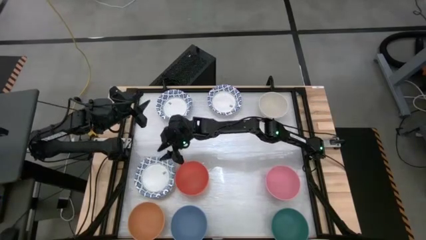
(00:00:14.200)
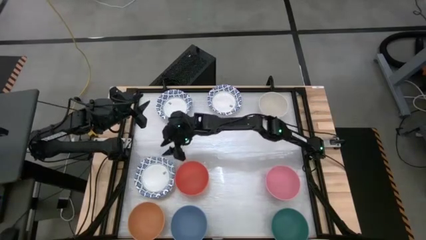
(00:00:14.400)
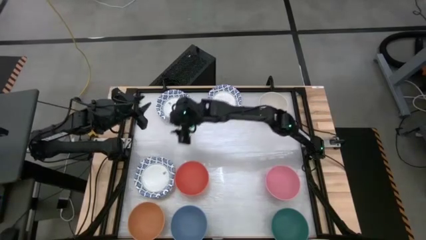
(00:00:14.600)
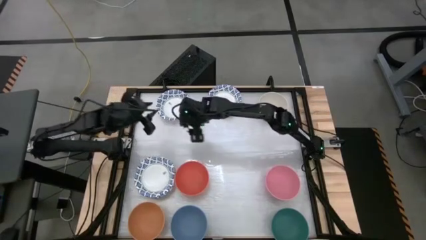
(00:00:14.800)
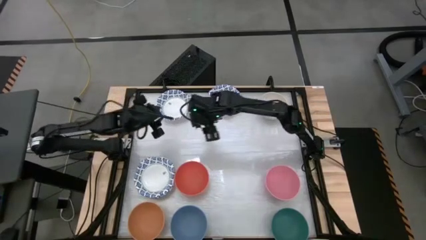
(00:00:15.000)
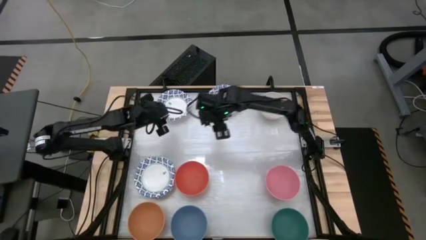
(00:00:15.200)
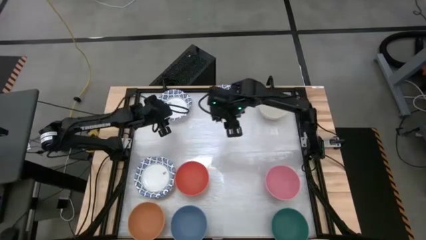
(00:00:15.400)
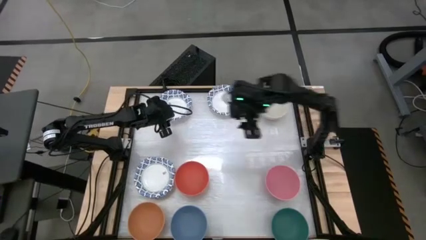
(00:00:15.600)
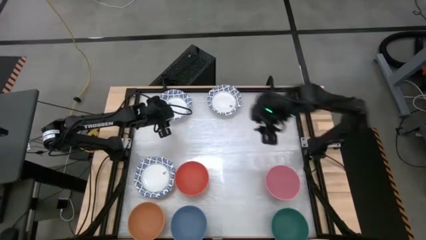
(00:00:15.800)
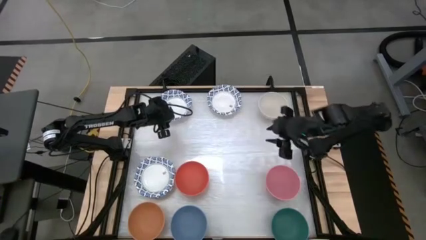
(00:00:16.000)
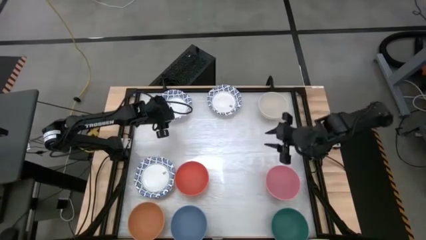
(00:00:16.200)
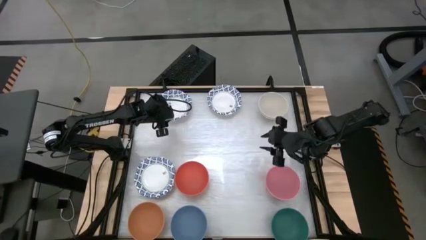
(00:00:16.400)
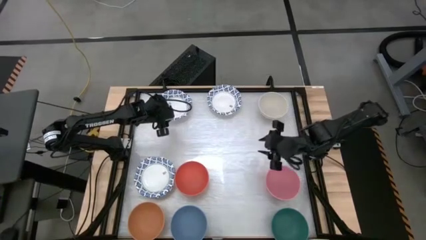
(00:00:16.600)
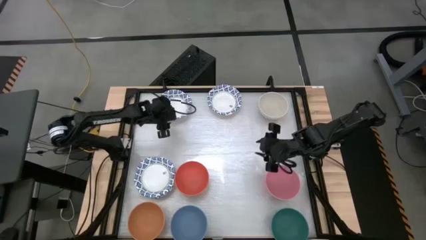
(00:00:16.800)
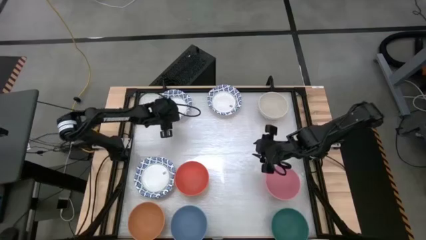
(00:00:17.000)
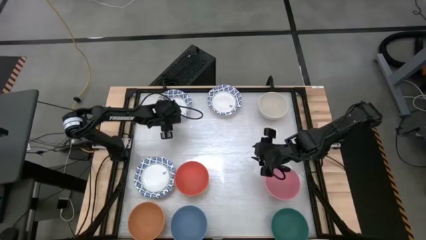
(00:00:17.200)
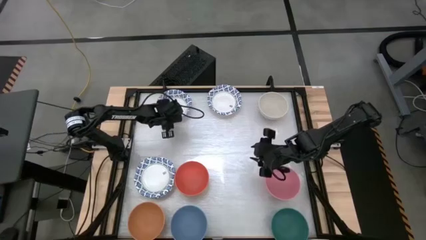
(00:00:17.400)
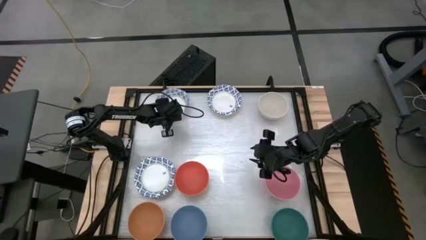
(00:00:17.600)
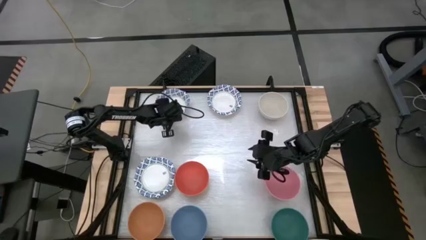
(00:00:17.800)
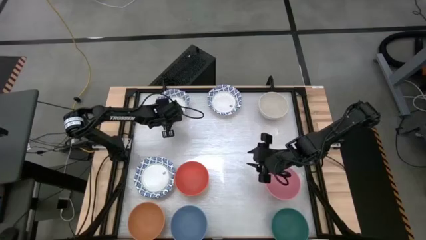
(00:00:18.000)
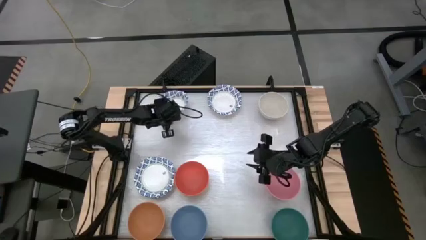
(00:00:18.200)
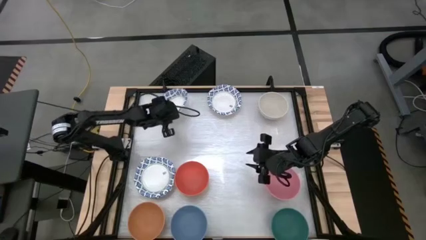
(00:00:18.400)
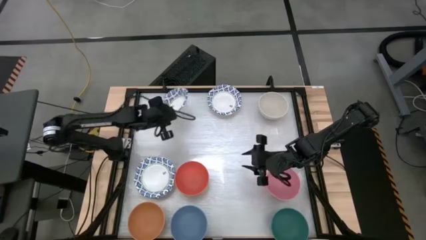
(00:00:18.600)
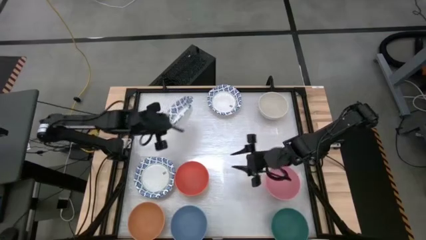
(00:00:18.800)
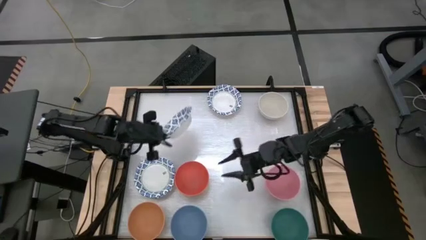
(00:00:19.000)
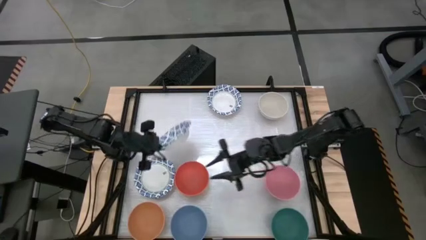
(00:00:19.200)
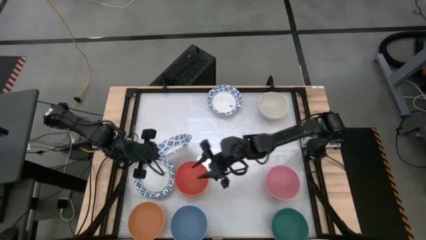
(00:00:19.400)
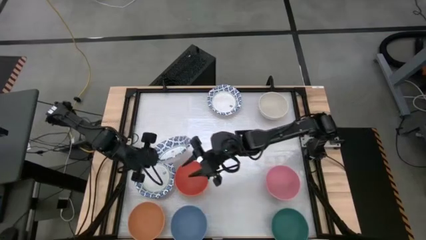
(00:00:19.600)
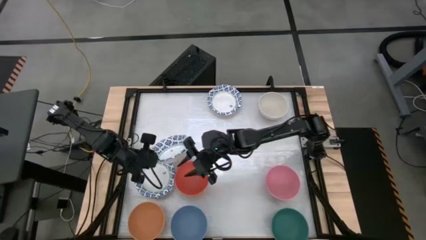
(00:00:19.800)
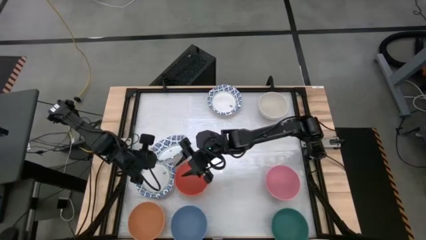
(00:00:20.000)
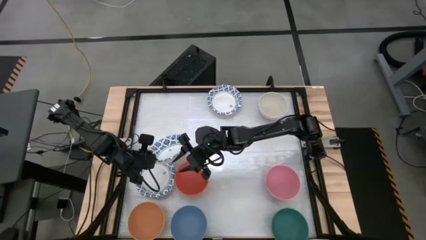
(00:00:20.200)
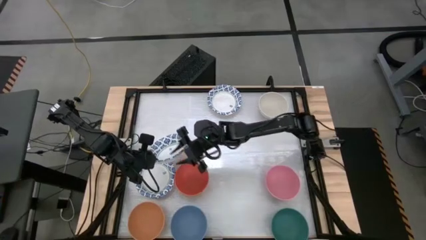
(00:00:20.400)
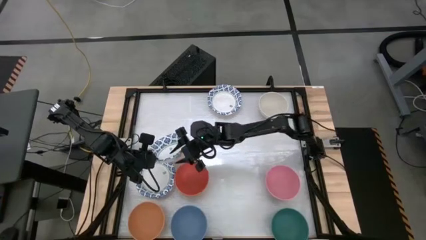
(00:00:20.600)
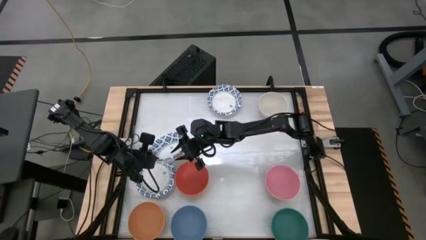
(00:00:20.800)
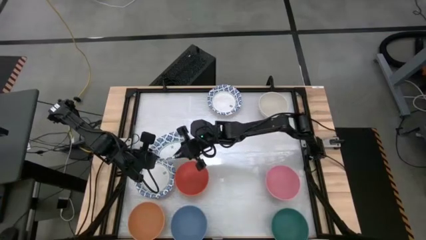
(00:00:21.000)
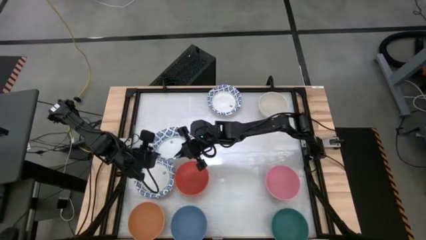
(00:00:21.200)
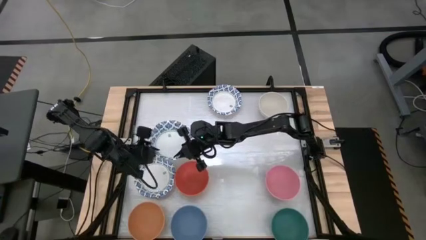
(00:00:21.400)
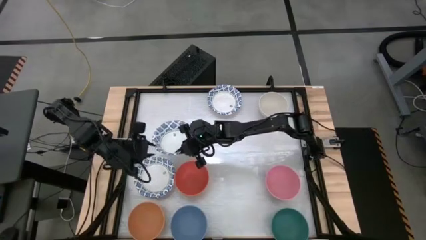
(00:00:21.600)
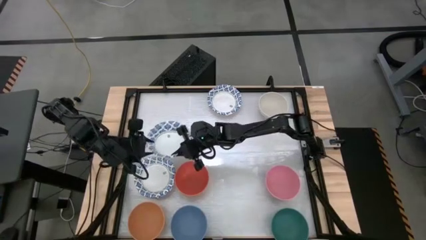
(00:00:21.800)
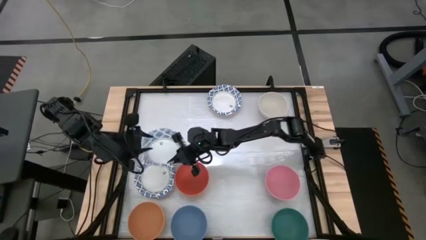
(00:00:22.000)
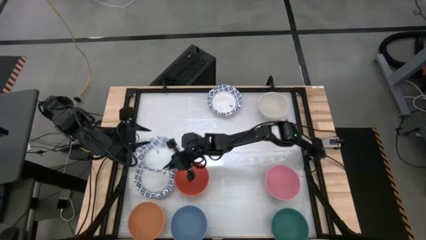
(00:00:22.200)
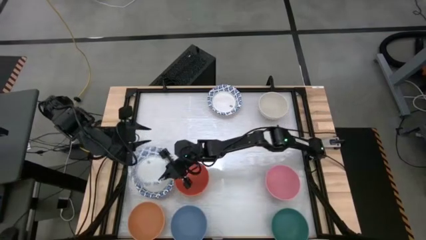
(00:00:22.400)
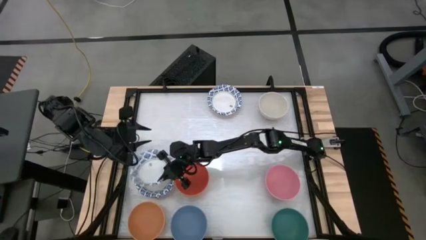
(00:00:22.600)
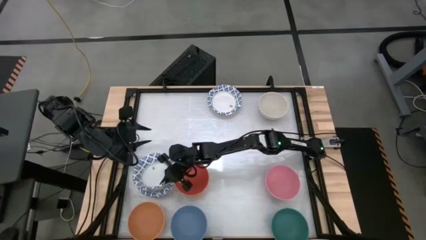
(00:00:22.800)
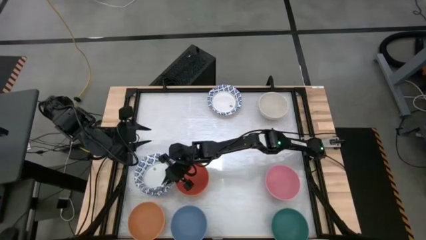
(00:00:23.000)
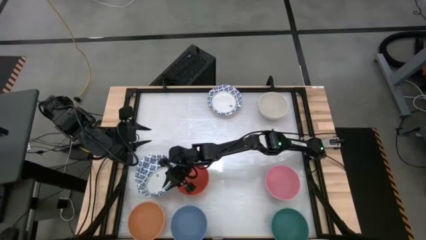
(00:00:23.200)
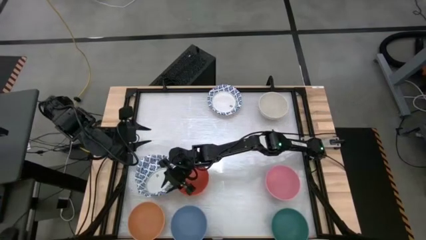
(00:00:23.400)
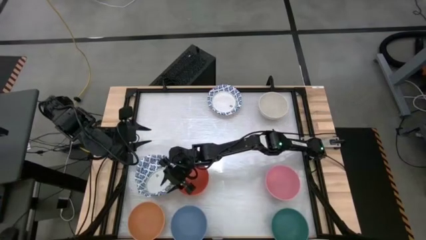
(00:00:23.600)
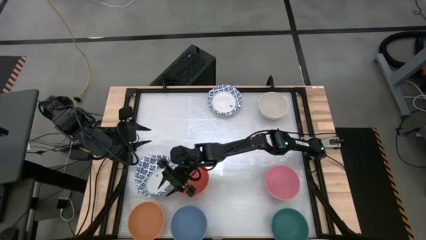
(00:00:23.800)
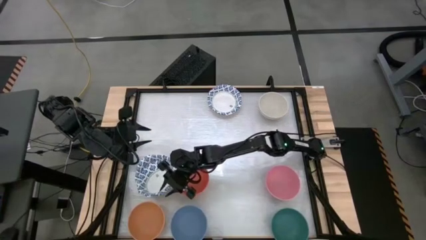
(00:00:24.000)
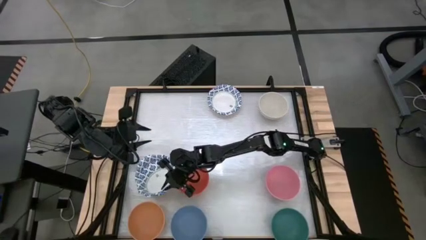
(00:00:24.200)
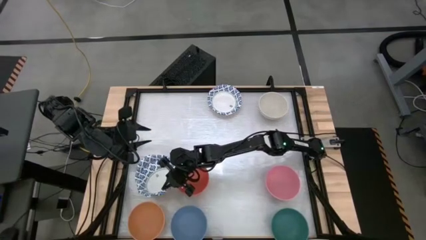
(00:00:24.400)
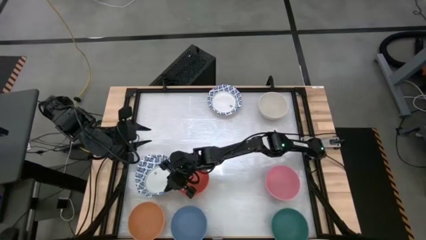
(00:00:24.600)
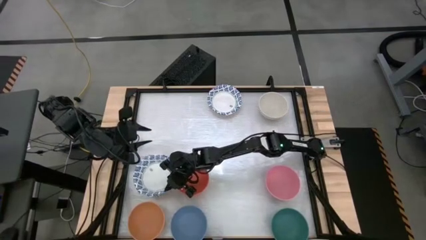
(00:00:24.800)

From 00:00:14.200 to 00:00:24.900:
Stack the blue patterned bowl into the blue patterned bowl
